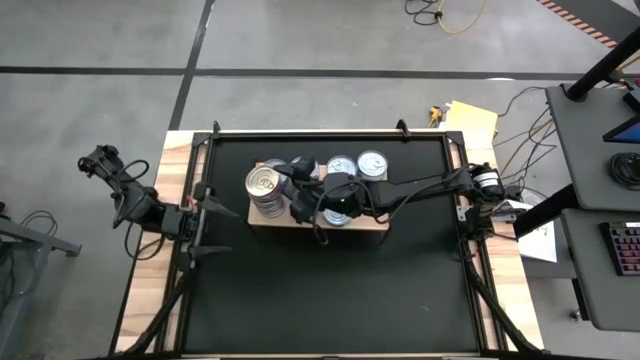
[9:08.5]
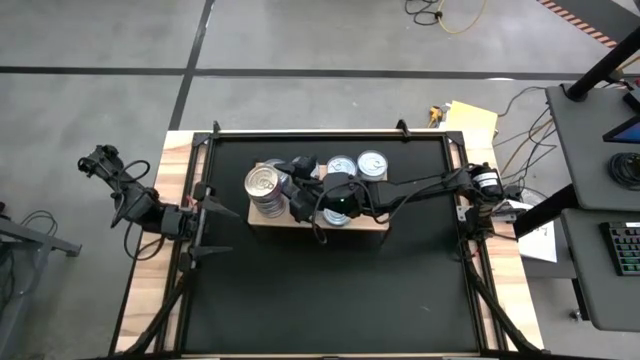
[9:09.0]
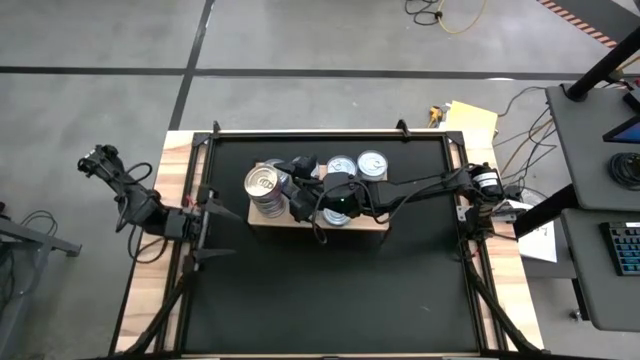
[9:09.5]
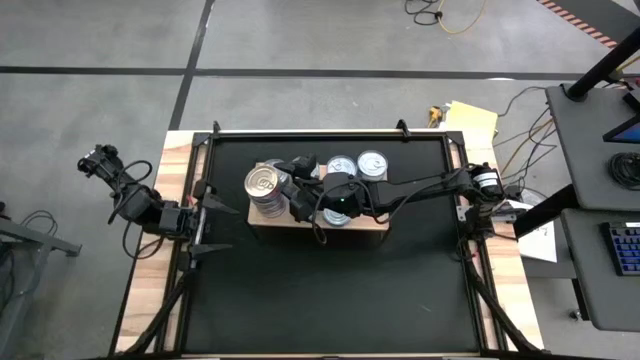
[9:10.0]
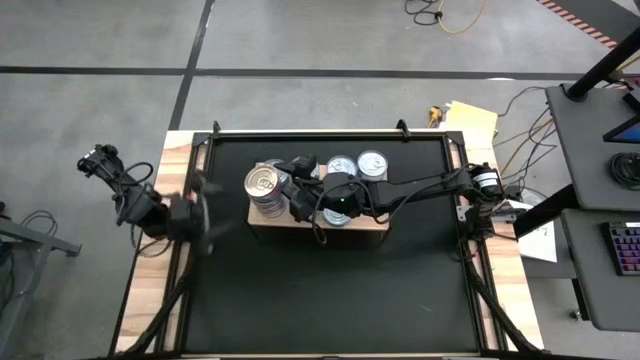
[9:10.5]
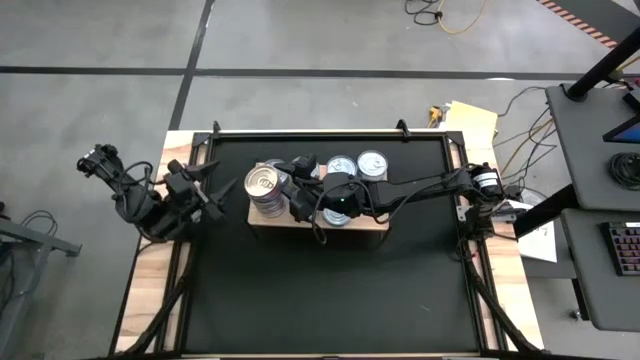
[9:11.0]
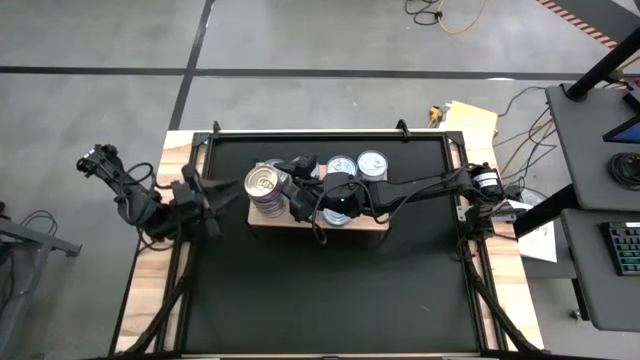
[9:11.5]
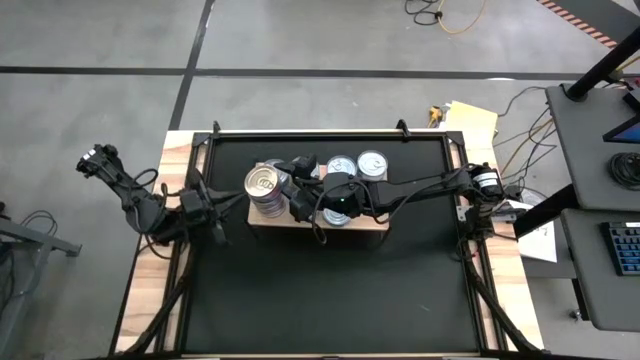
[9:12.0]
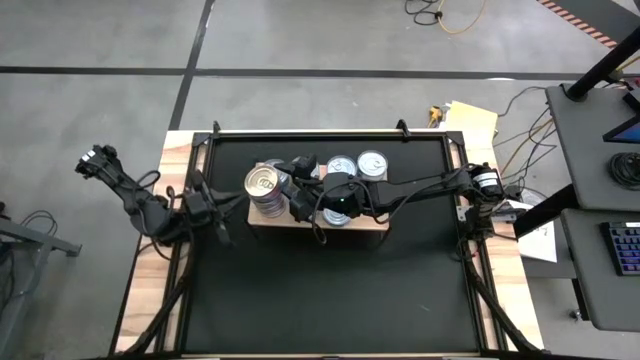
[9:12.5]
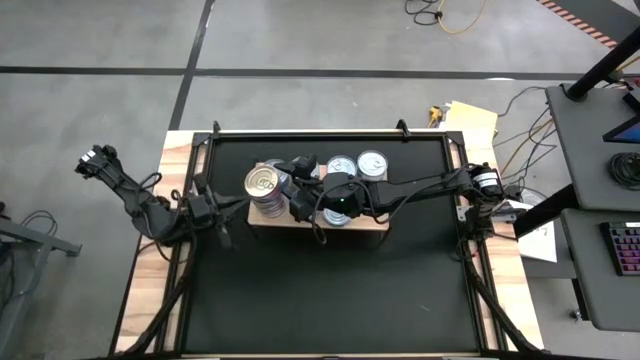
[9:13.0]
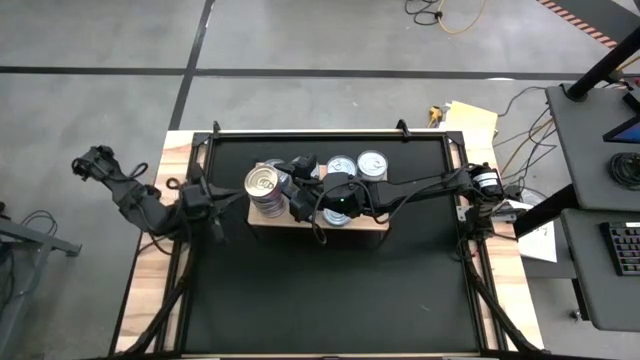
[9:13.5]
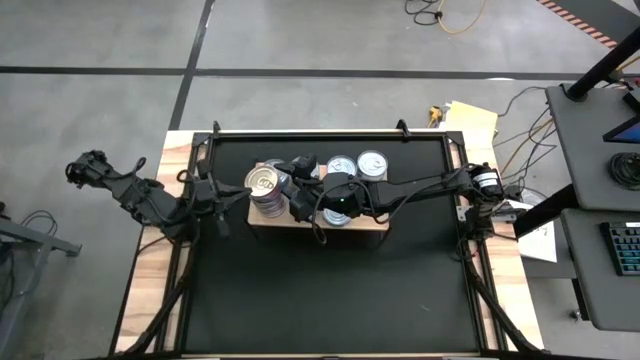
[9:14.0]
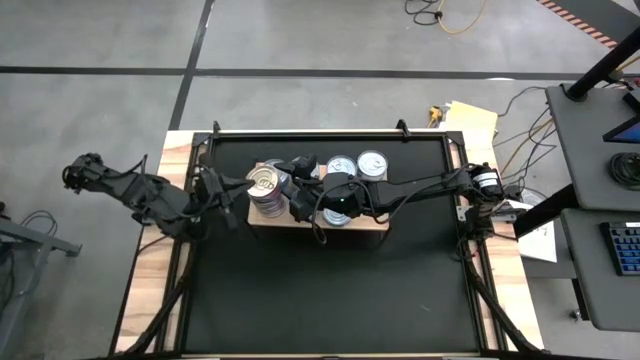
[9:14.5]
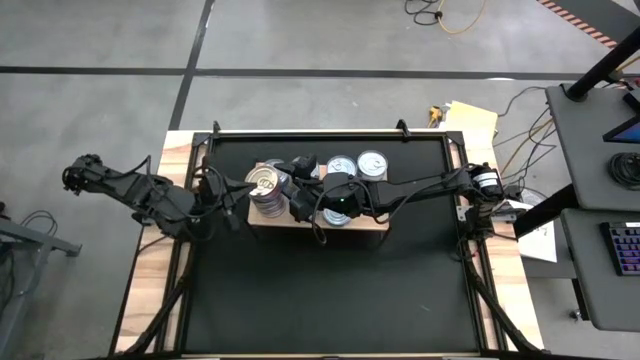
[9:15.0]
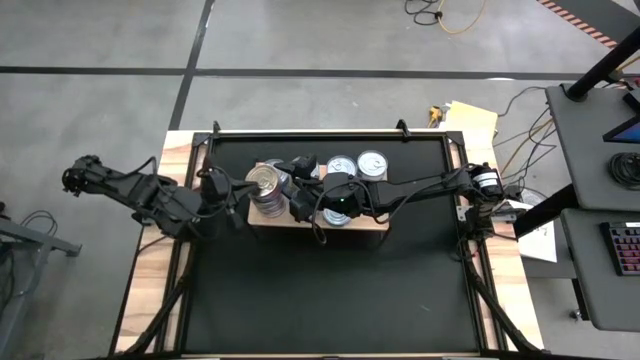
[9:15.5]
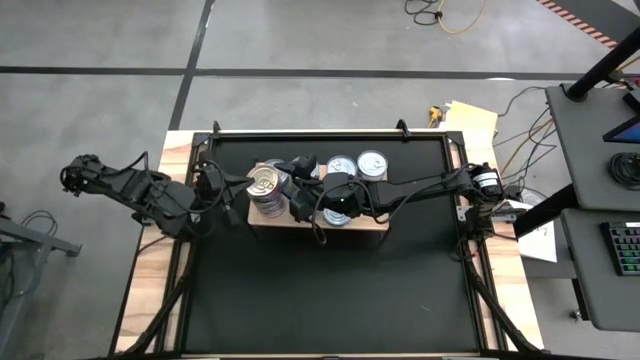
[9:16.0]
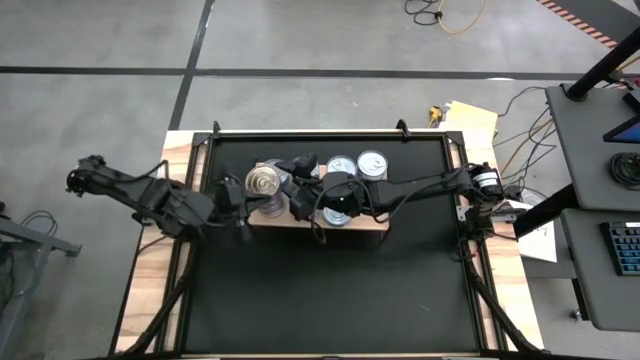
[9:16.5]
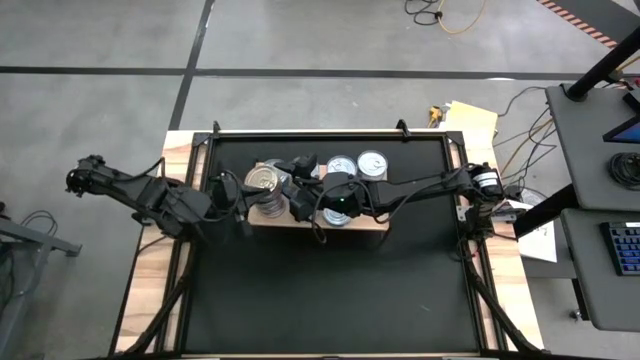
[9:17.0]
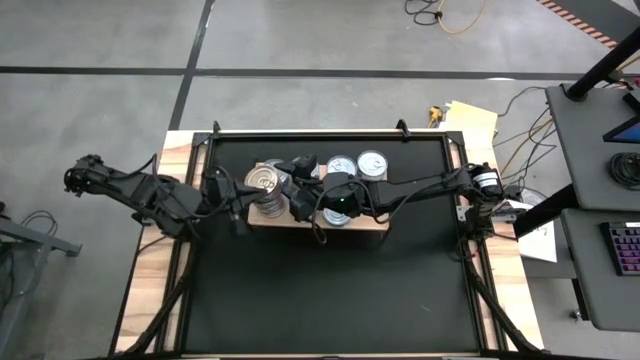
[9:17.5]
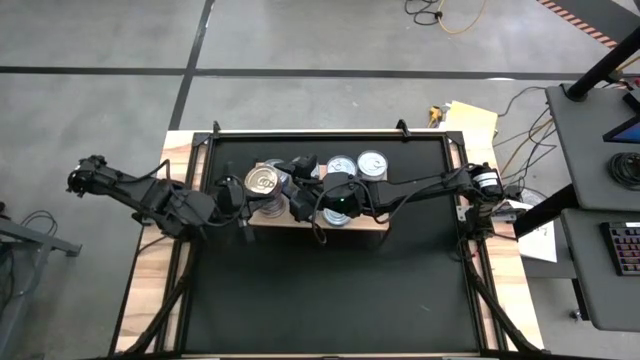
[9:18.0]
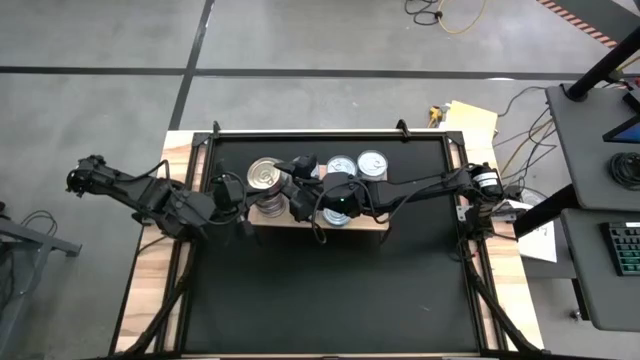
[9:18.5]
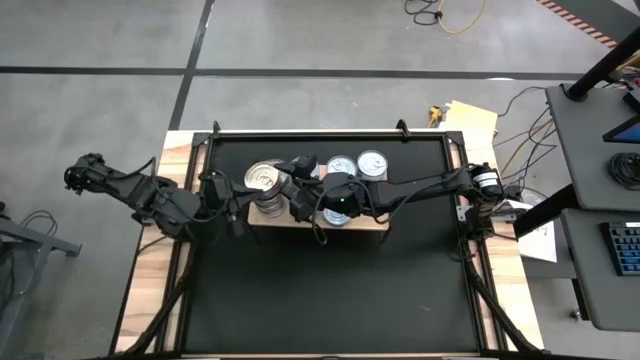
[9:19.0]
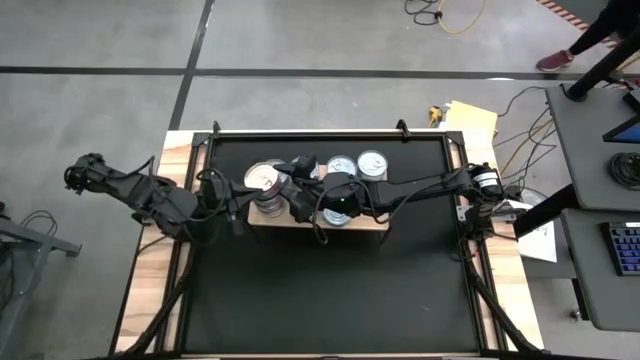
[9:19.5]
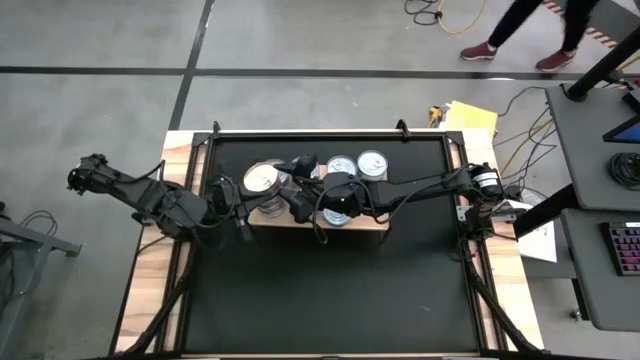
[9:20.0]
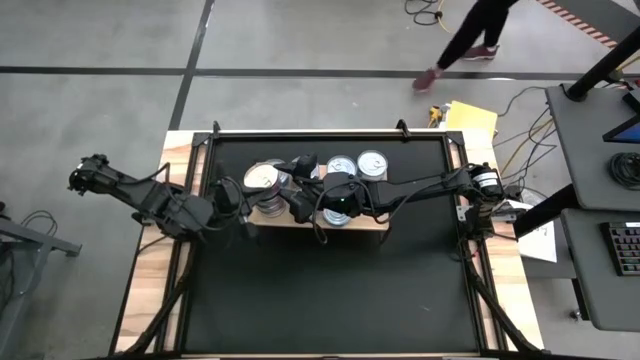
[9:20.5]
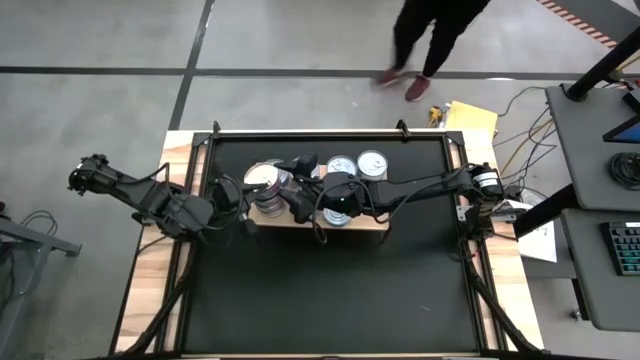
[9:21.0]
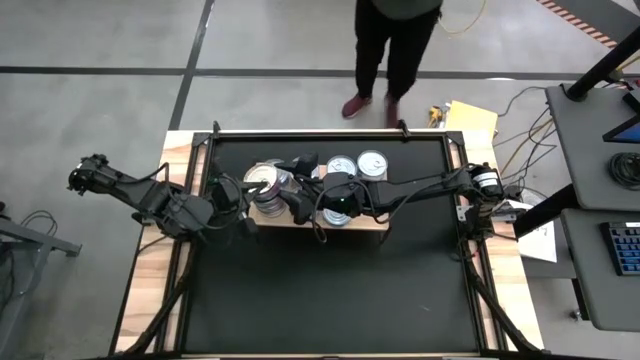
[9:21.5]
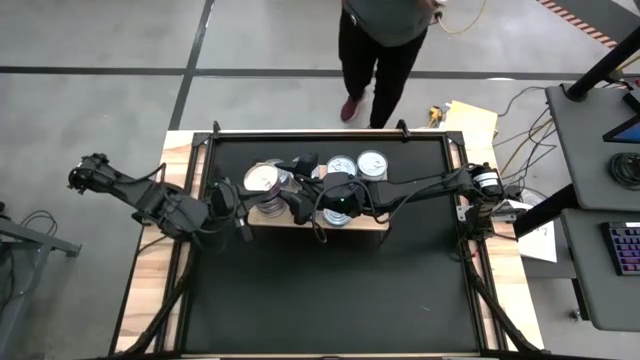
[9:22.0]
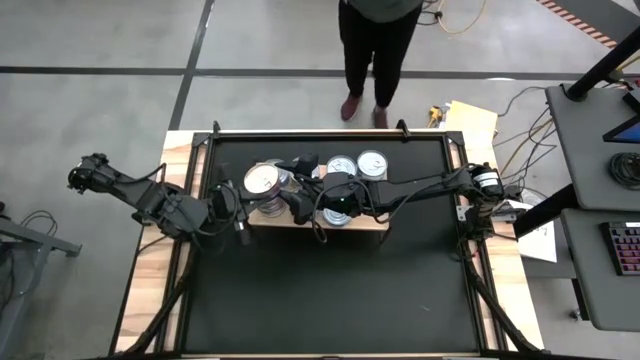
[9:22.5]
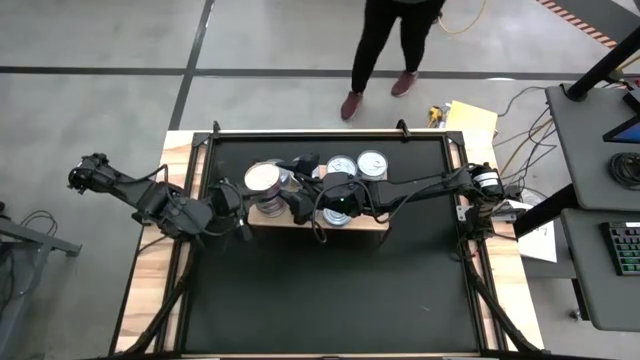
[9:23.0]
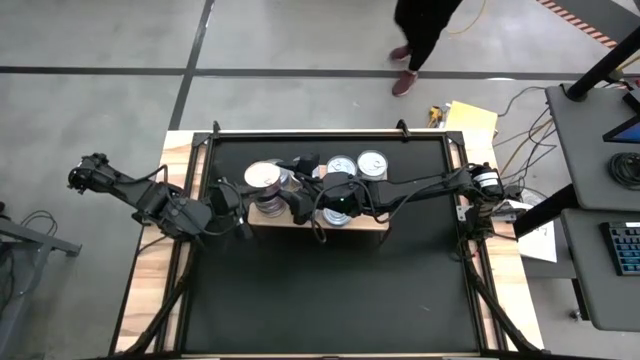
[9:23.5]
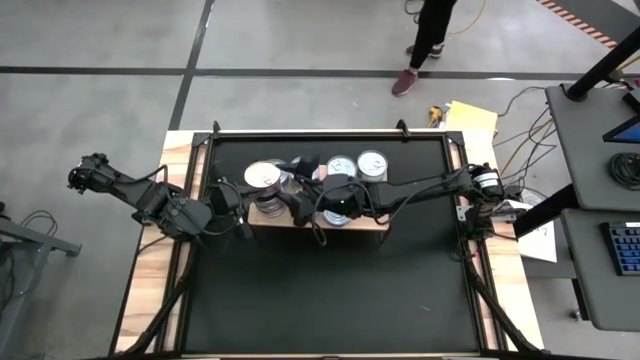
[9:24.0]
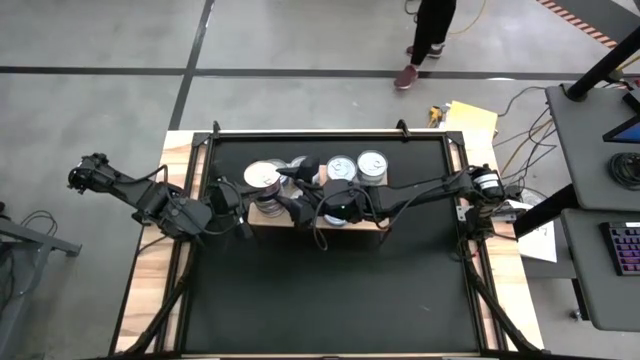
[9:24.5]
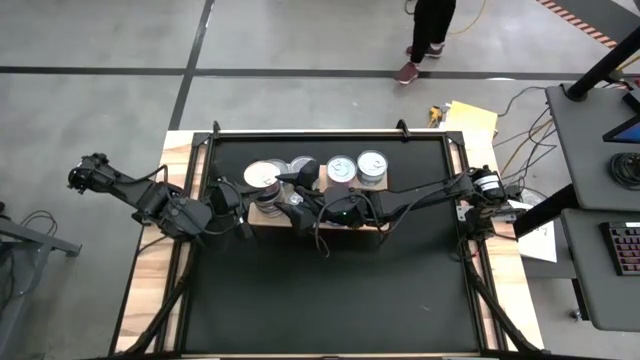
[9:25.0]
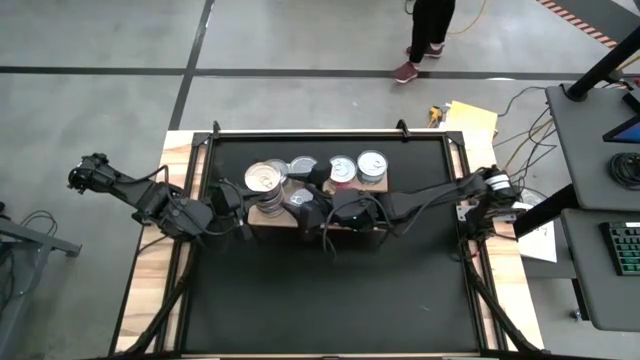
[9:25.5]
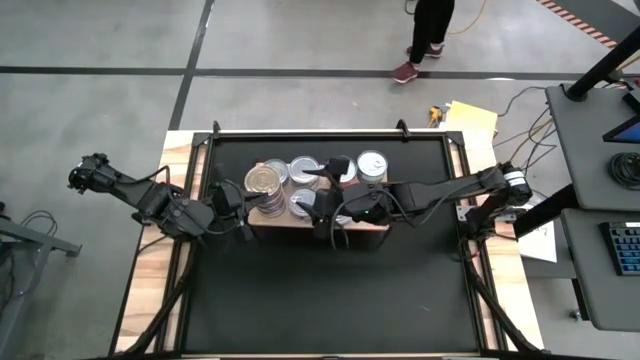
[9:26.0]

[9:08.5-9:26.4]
Task: Stack canned seafood by type on shelf
Stack the blue tuna can on the blue tuna can
